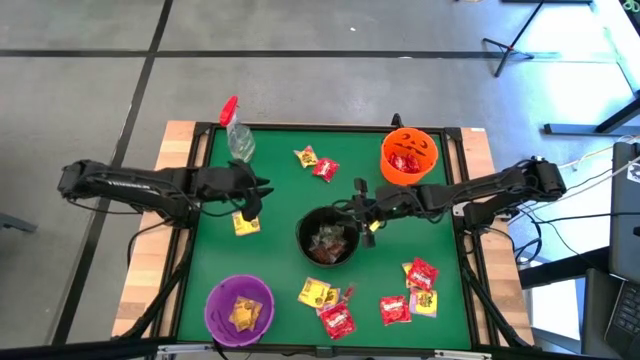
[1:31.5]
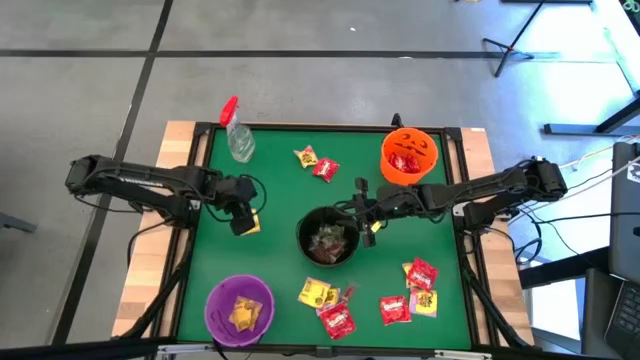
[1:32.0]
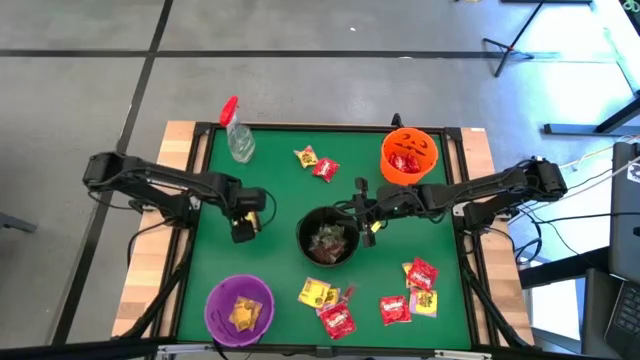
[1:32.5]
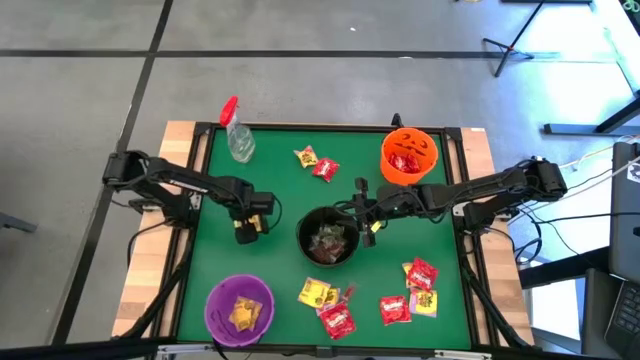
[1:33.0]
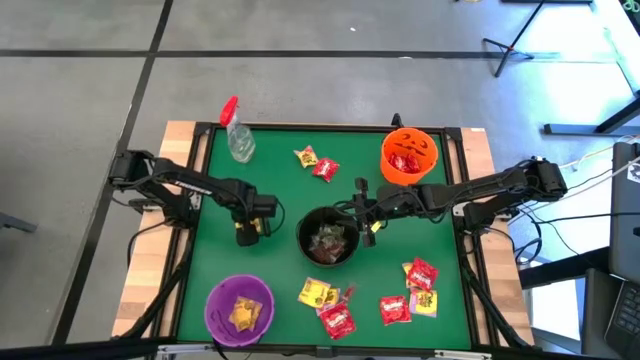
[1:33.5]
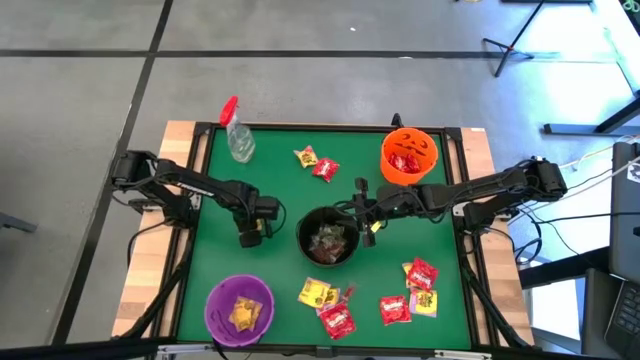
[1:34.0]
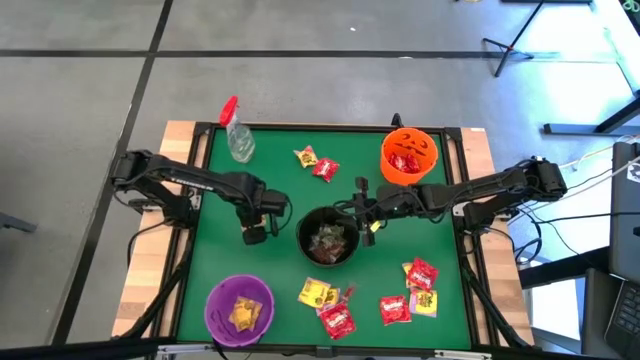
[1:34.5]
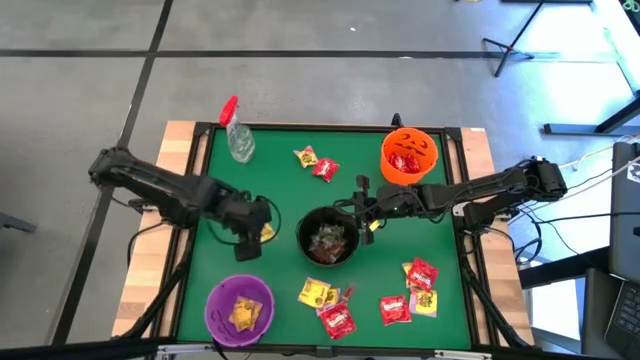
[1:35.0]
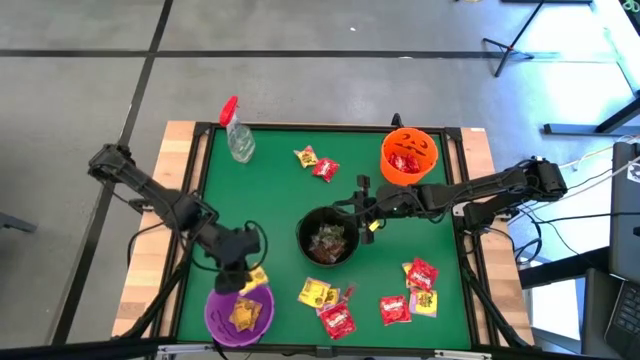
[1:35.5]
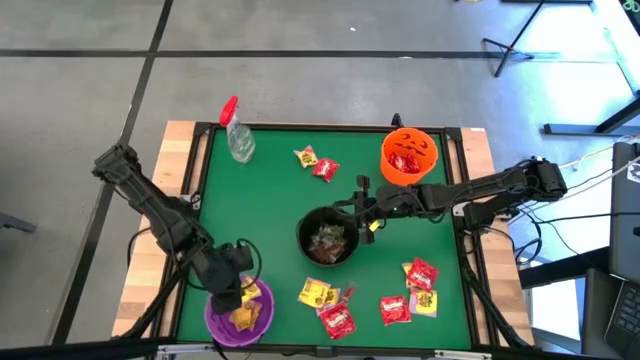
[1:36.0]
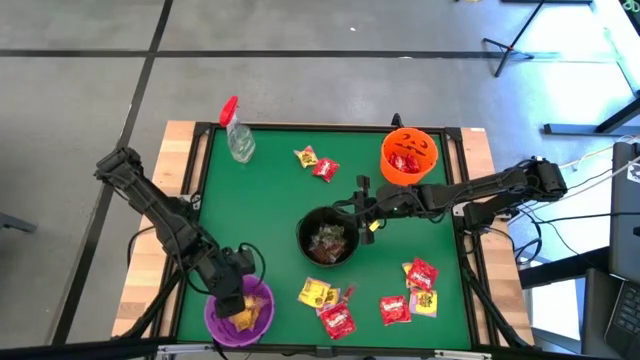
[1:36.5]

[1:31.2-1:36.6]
Task: Sort candy
Put the yellow candy into the purple bucket

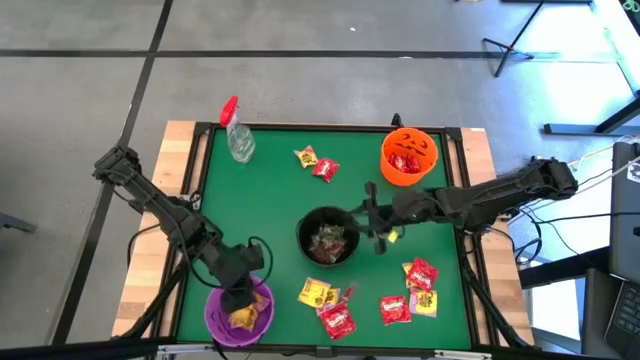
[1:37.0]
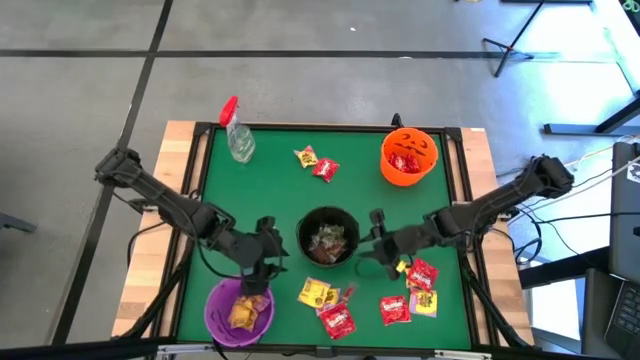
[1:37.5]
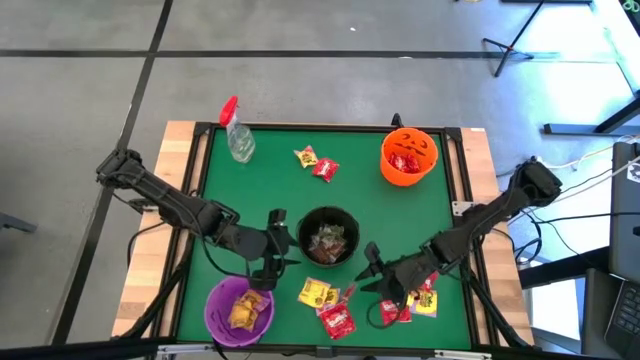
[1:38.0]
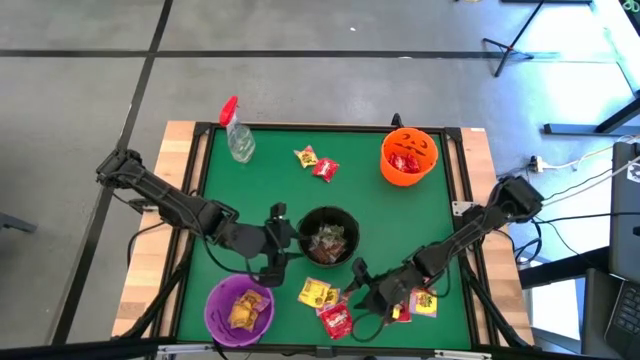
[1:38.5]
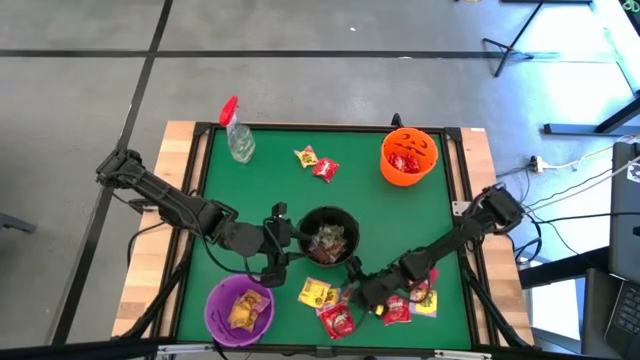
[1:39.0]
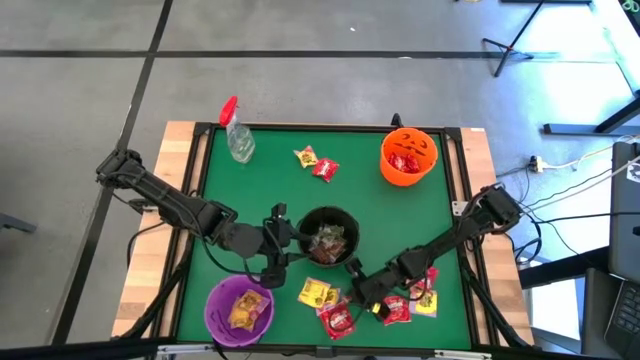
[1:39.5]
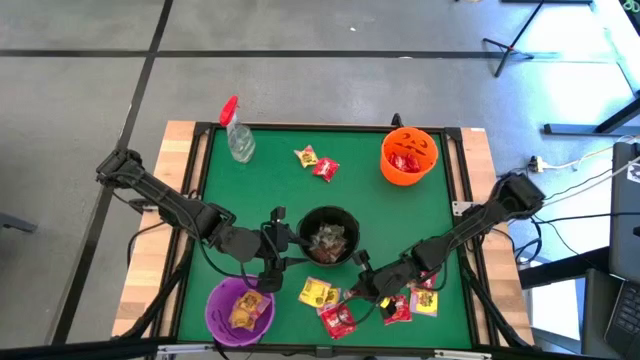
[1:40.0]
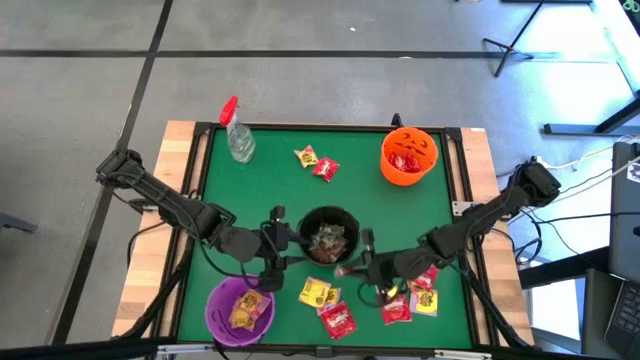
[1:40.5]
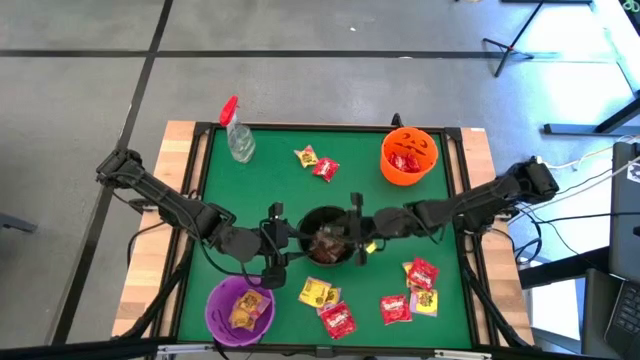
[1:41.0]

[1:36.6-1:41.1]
Put the red candy into the orange bucket

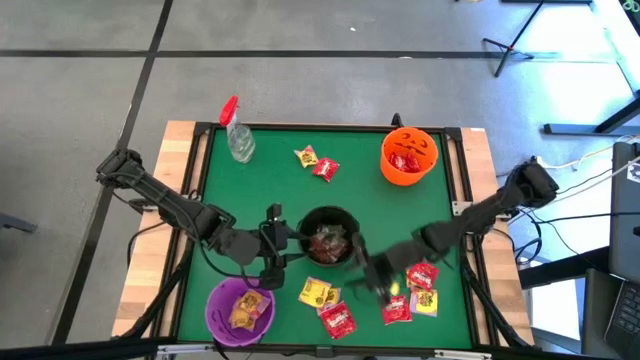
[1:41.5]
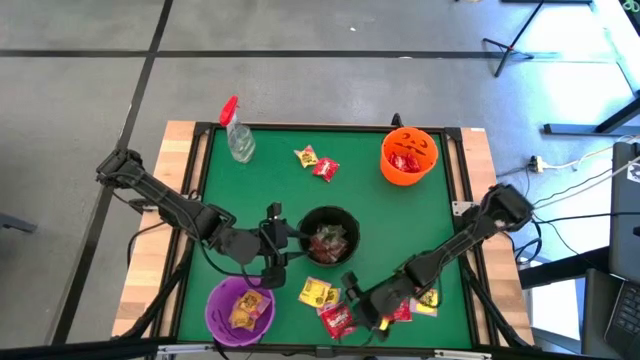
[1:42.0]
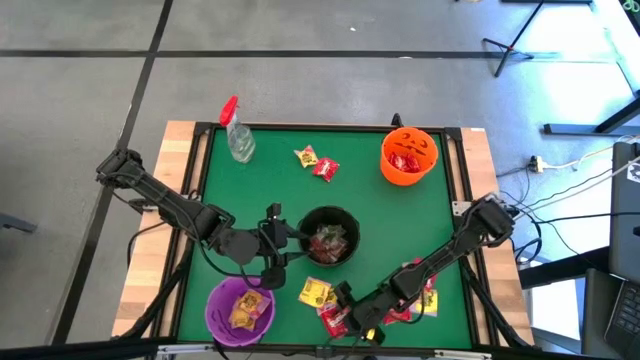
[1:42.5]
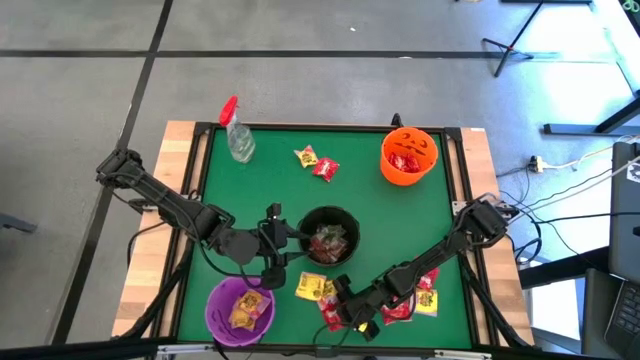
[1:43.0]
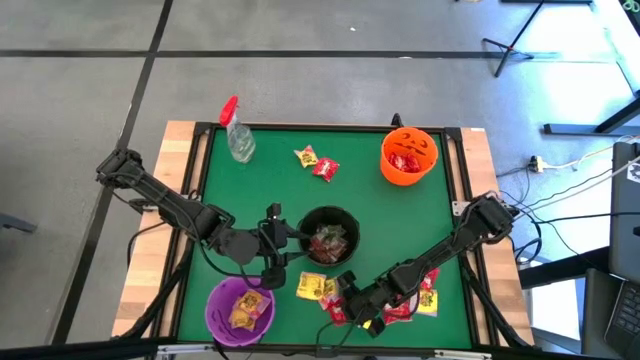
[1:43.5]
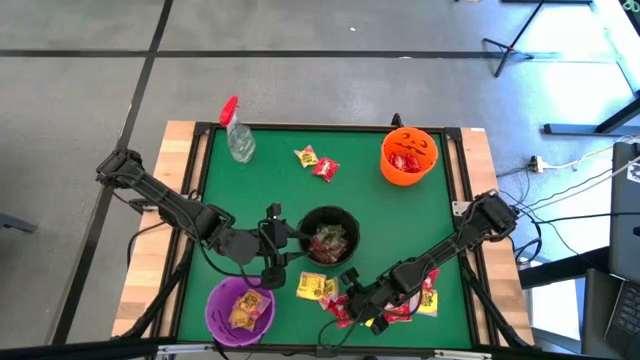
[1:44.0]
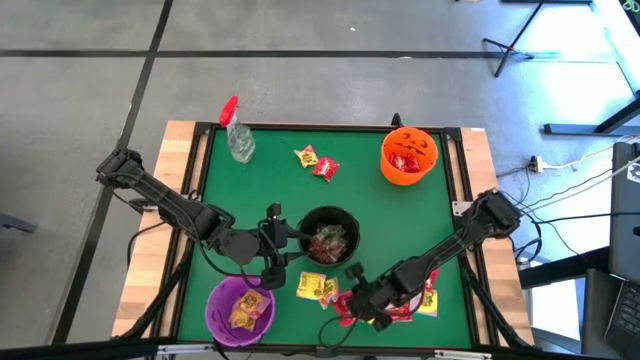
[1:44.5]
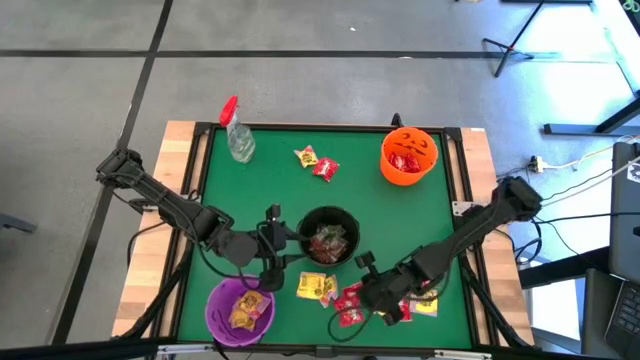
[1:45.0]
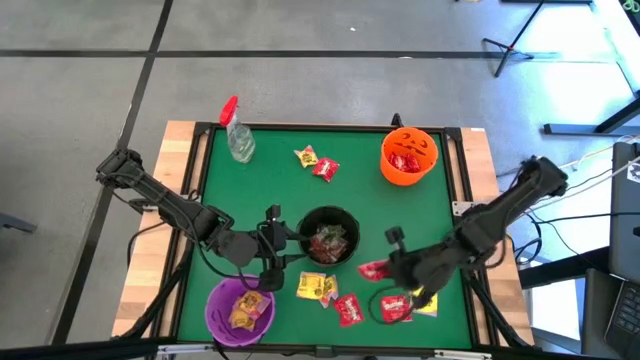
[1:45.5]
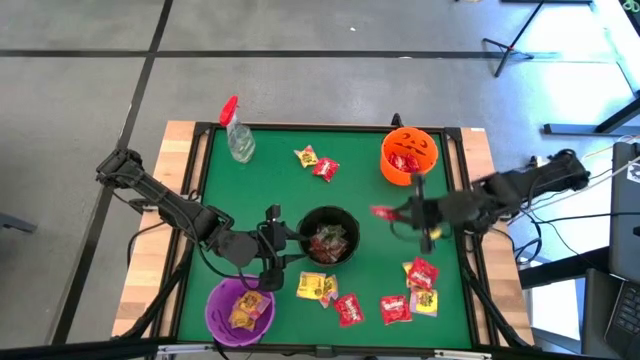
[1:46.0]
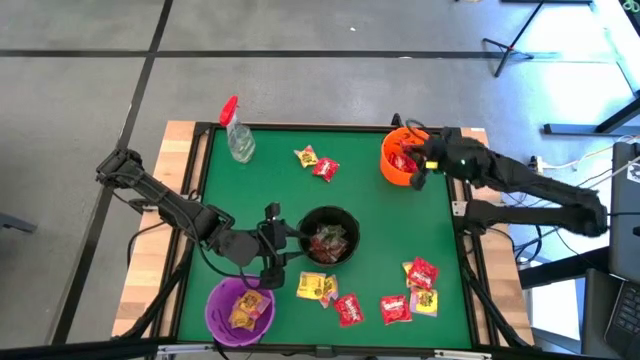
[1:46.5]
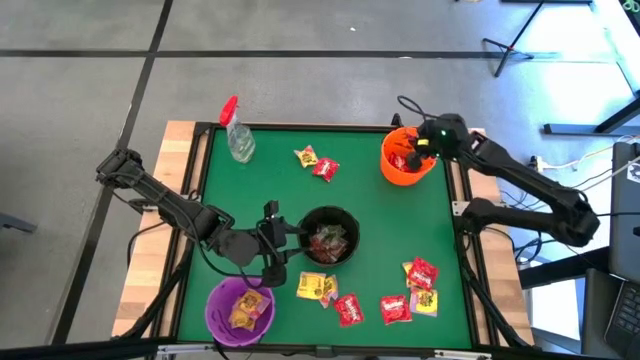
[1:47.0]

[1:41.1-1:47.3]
Put the red candy into the orange bucket

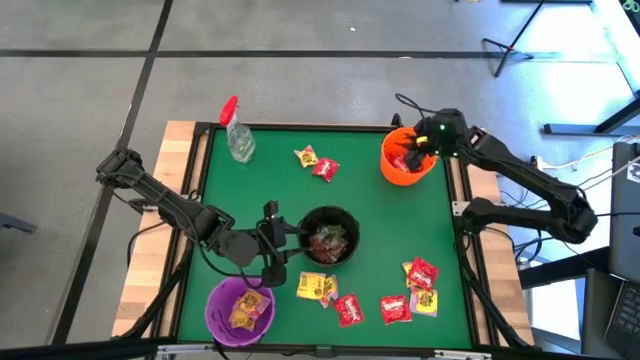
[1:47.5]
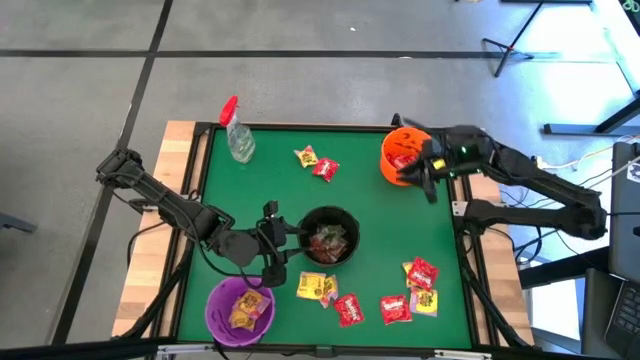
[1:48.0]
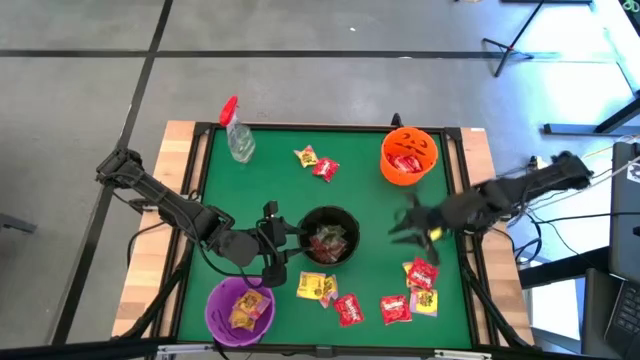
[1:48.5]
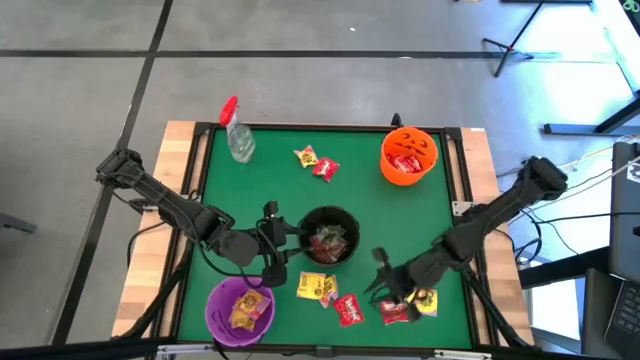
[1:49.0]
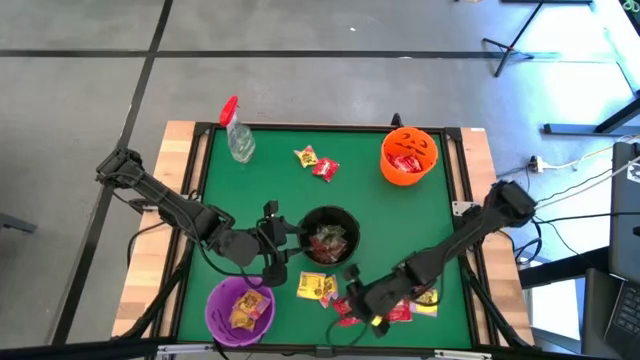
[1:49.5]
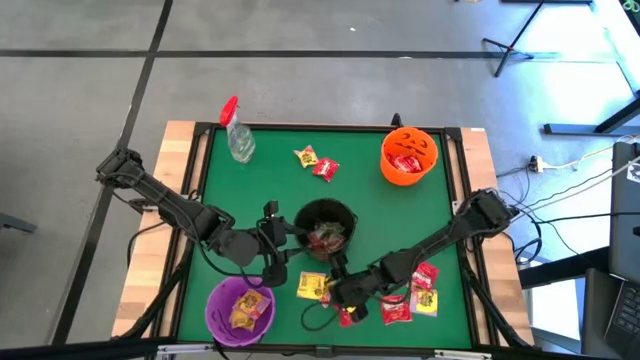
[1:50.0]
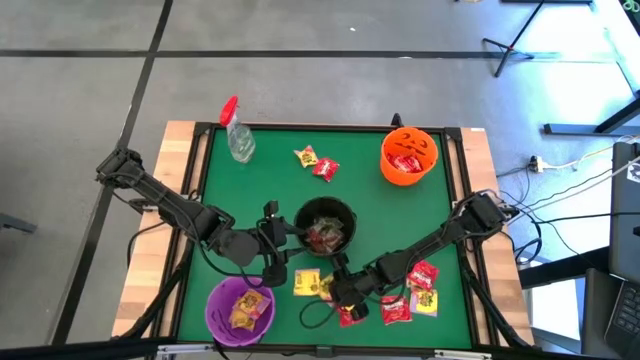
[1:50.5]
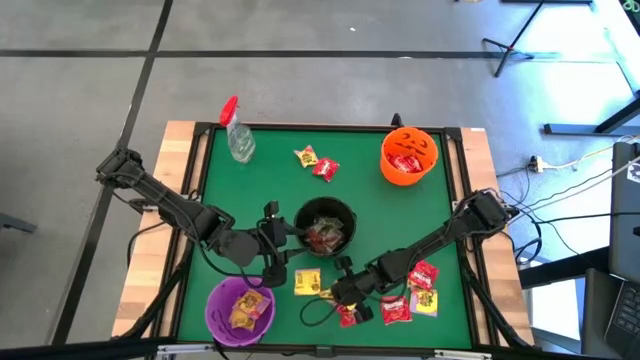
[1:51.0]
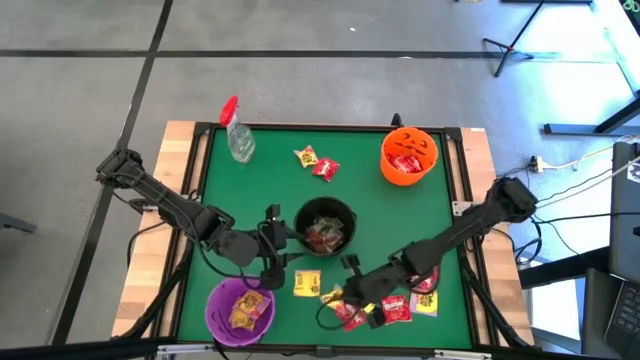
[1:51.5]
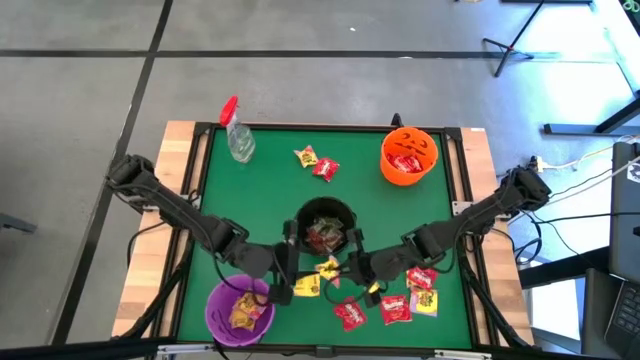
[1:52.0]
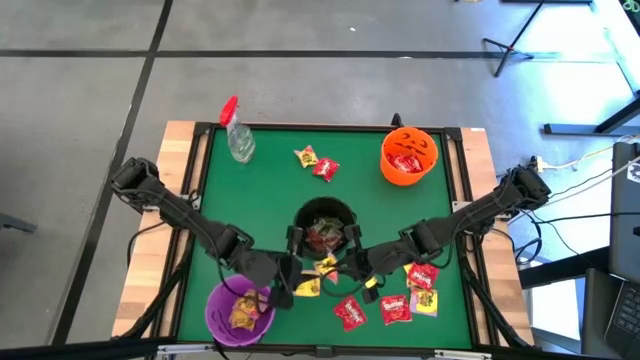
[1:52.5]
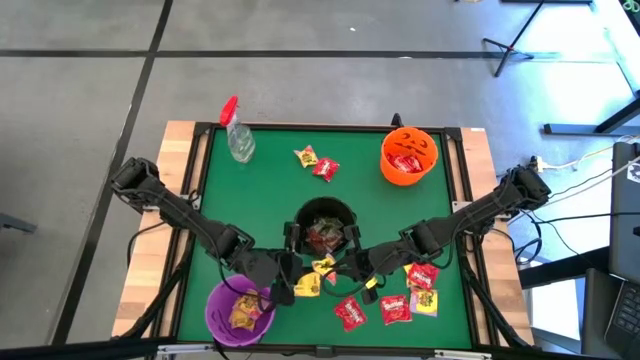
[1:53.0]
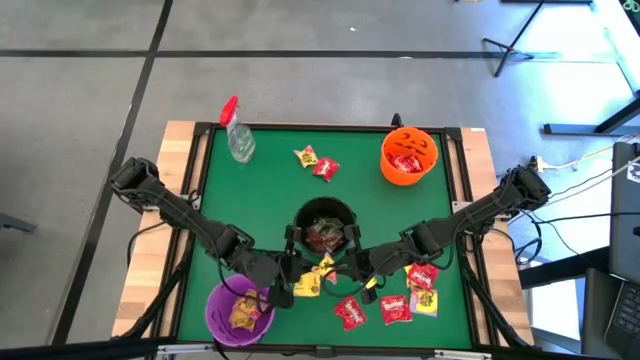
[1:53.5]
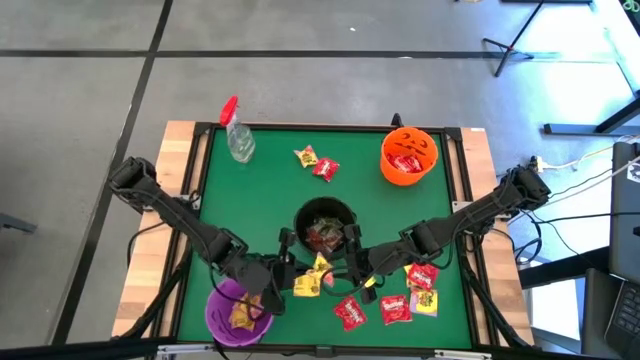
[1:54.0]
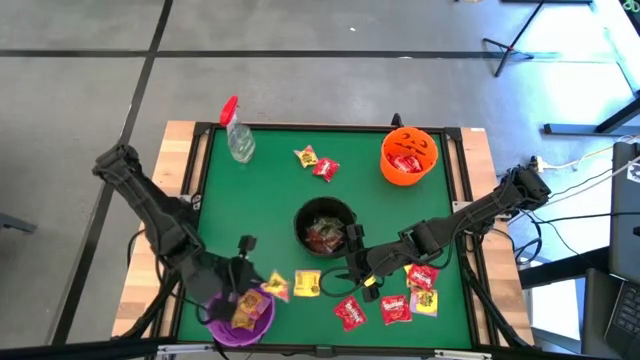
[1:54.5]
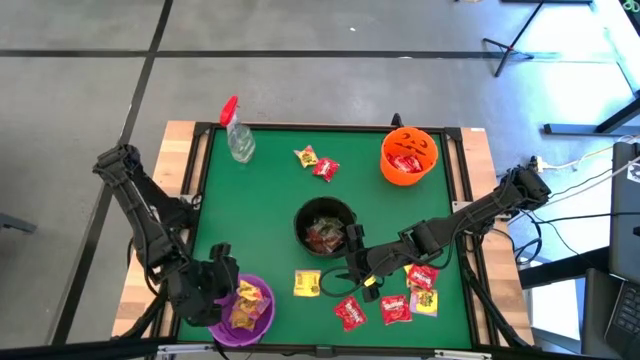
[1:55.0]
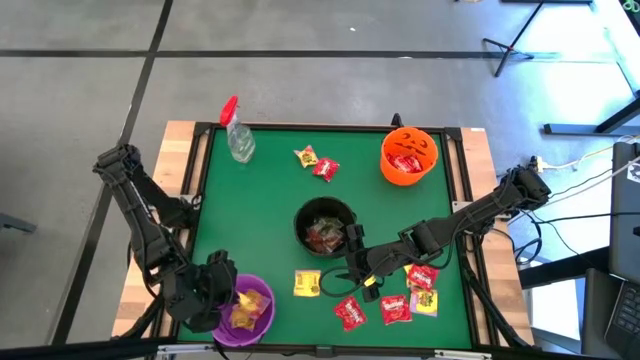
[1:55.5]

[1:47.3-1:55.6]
Put the yellow candy into the purple bucket
